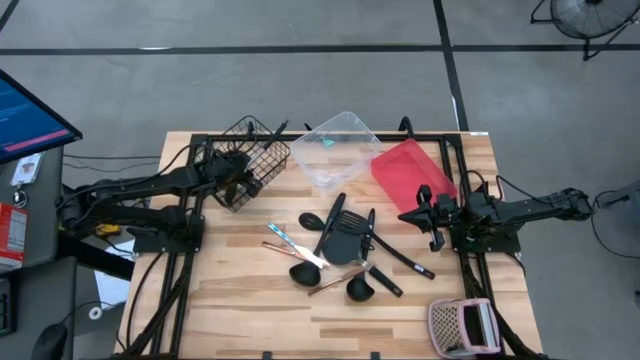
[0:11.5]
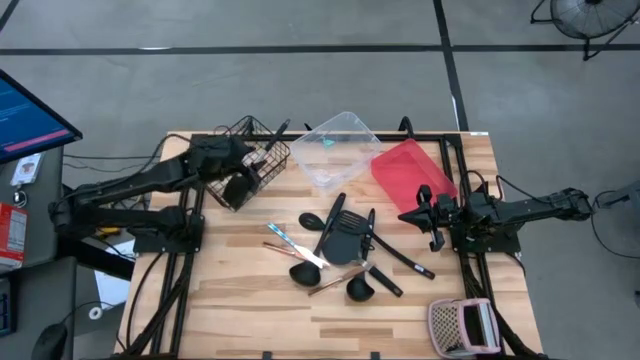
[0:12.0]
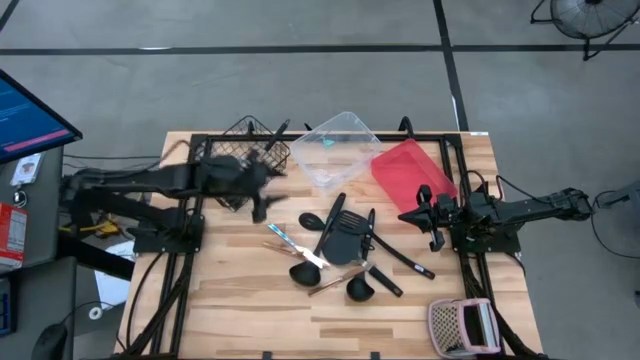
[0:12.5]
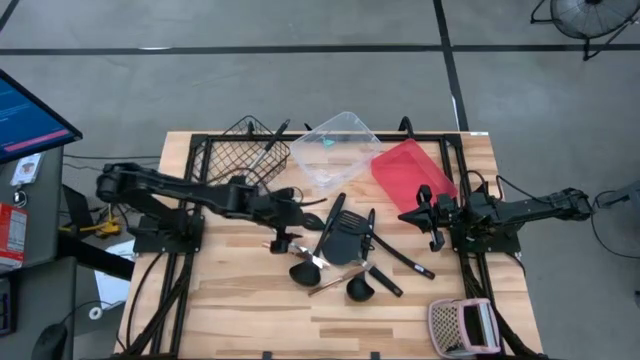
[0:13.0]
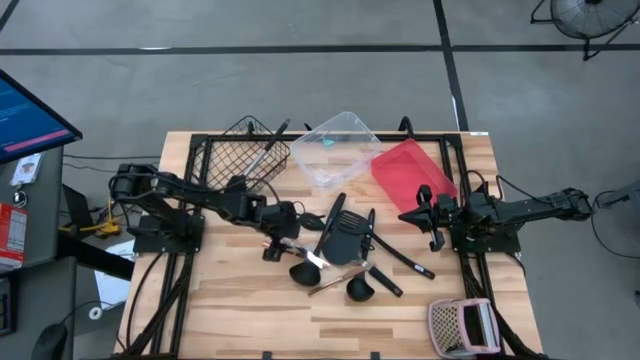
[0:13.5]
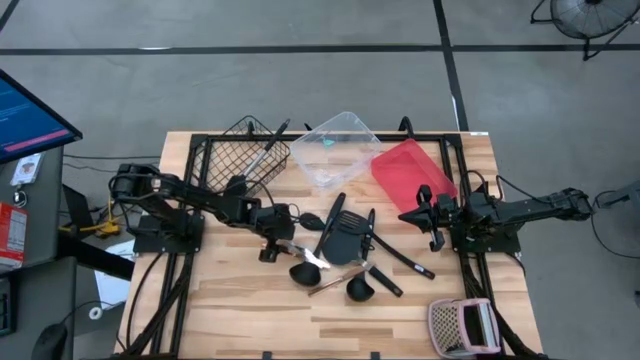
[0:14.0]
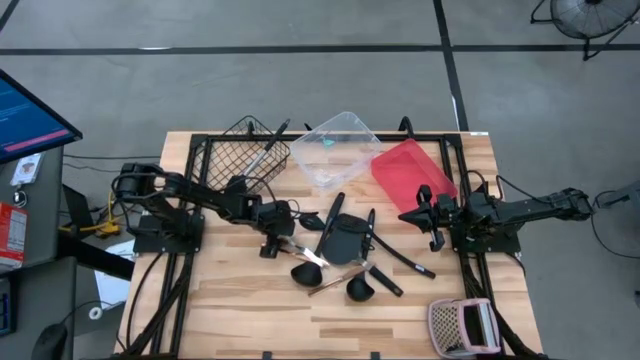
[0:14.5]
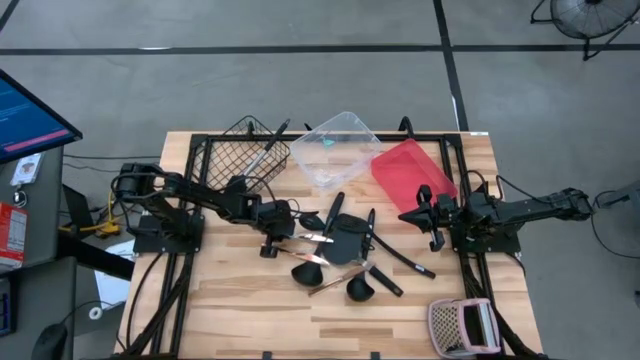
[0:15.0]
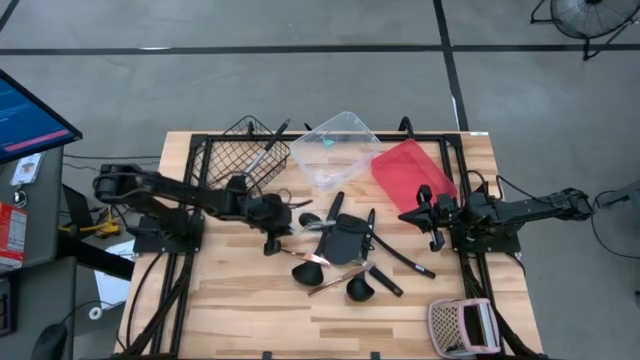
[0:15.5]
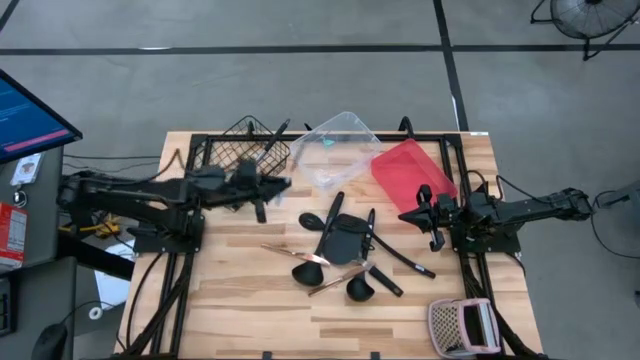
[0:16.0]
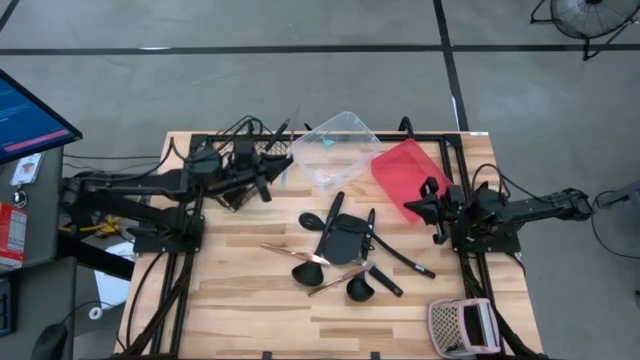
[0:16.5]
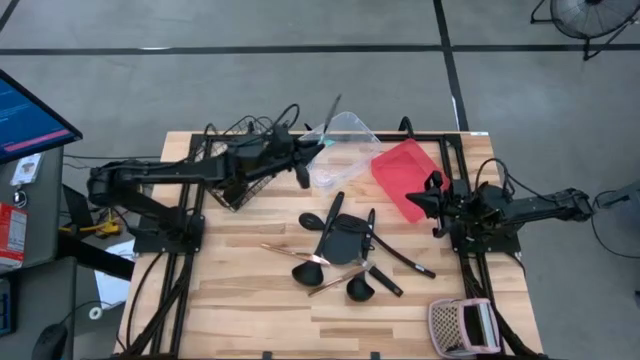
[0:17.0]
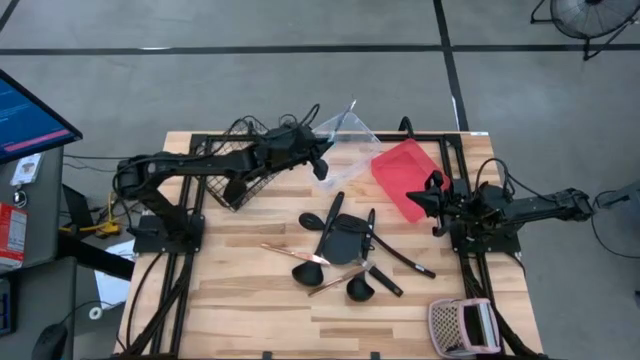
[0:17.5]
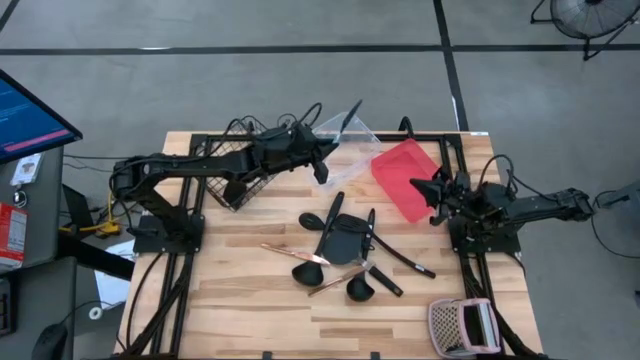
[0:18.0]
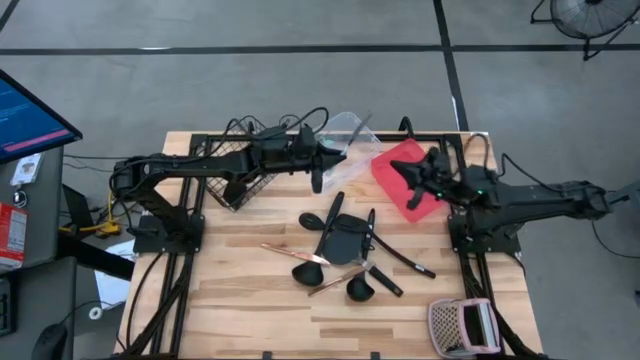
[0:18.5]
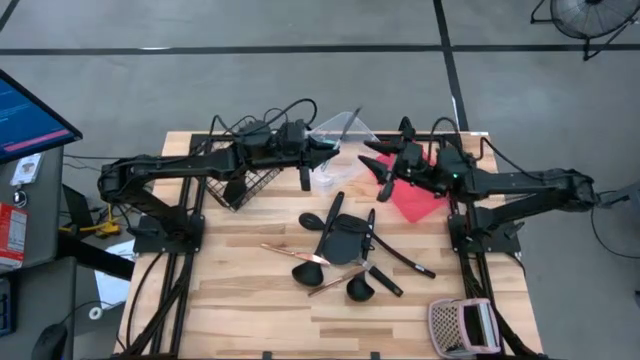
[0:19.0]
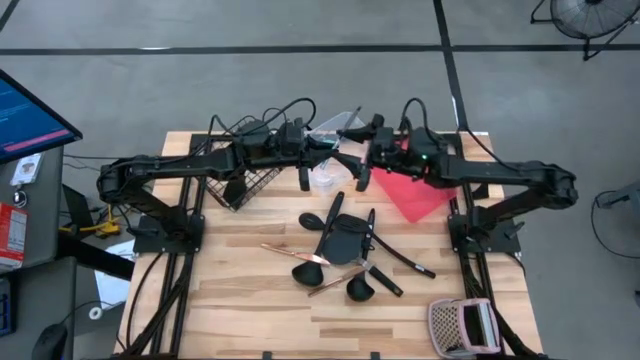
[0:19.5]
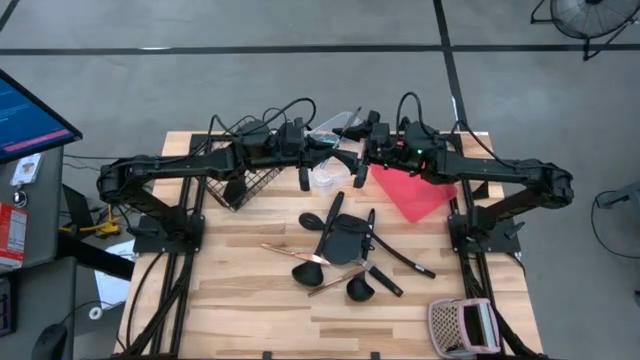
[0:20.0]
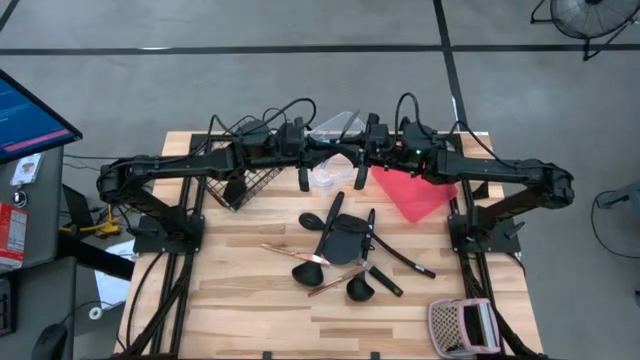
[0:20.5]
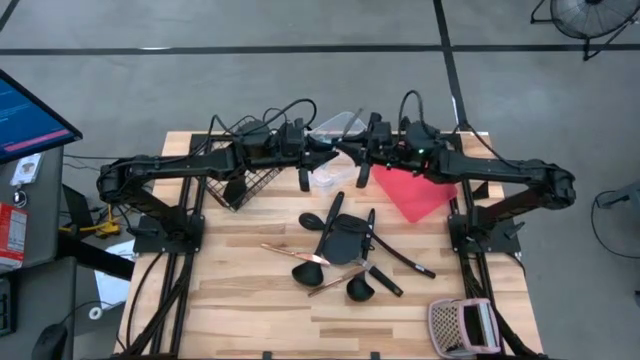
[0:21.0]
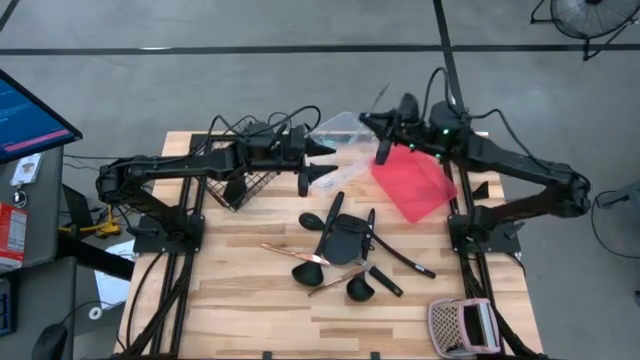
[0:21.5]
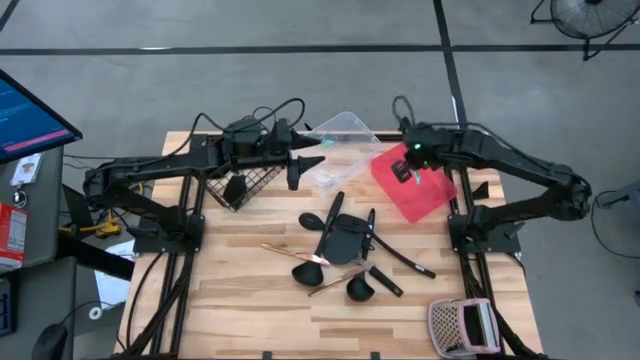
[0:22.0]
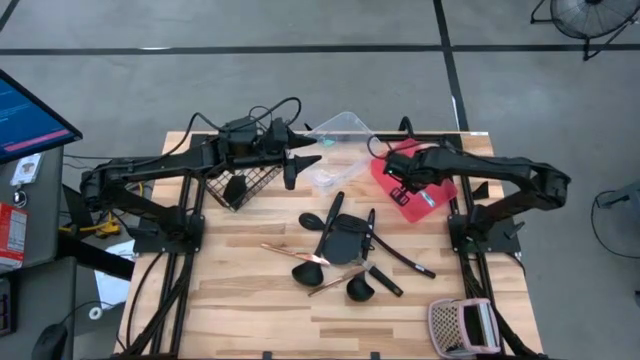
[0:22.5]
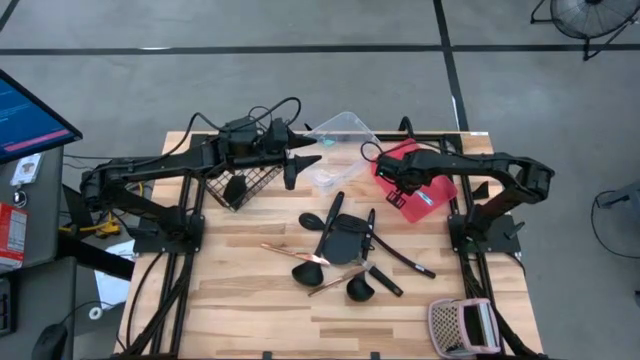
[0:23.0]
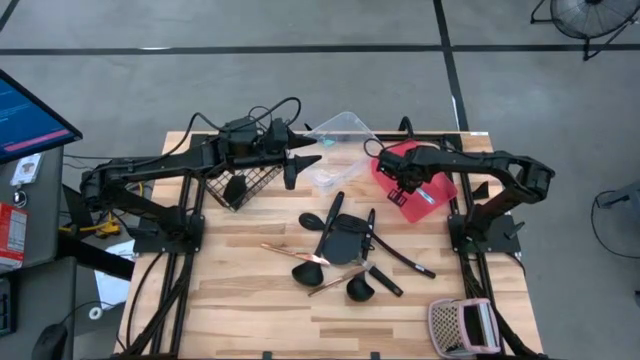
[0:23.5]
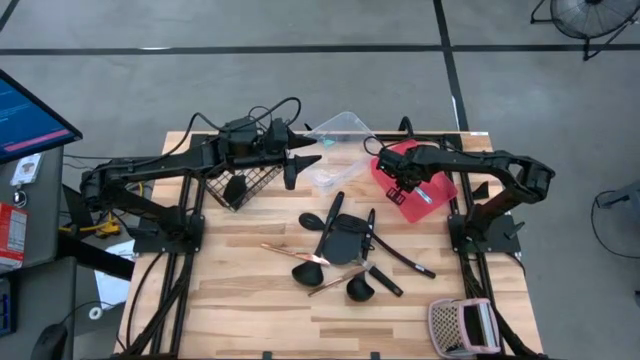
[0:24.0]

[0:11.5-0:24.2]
Task: Pick & Place Kitchen Items
Put the blue knife into the red bin

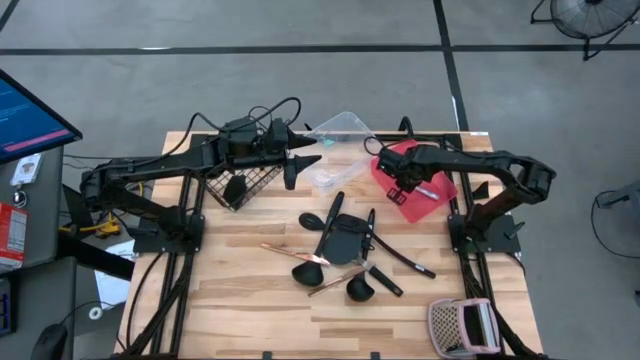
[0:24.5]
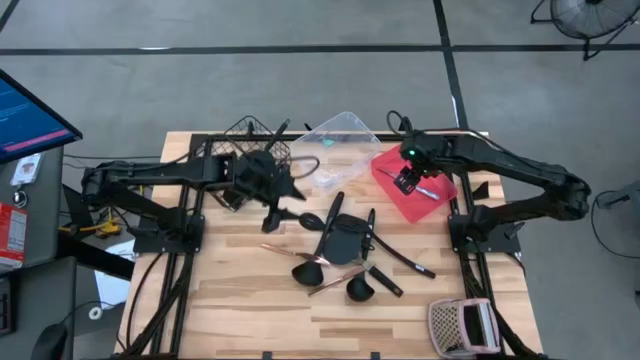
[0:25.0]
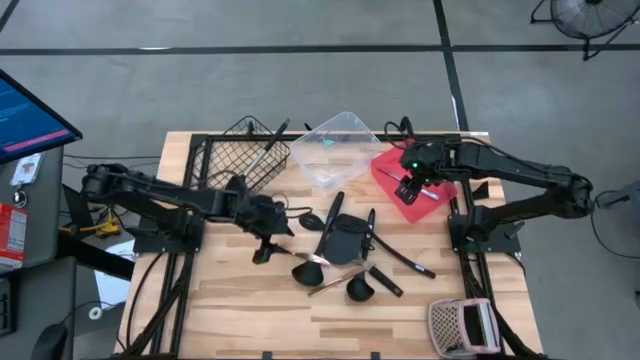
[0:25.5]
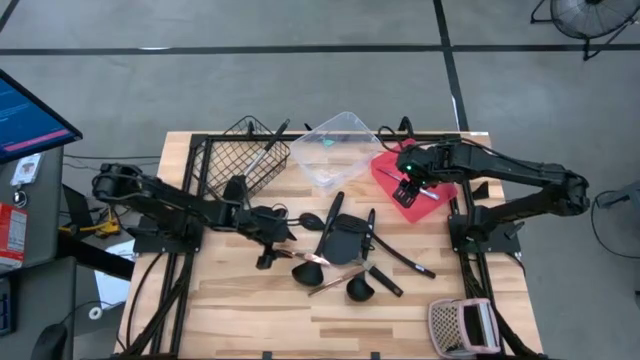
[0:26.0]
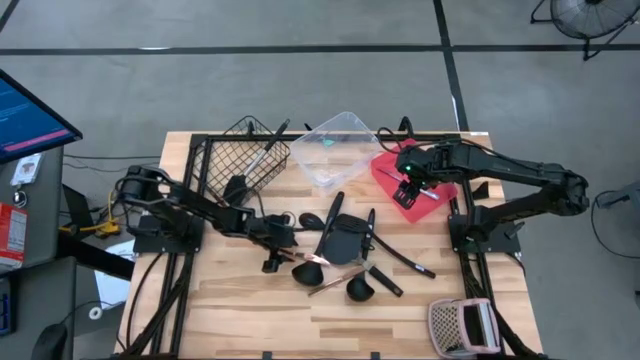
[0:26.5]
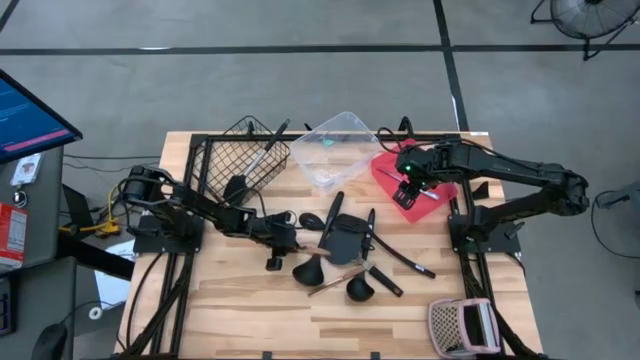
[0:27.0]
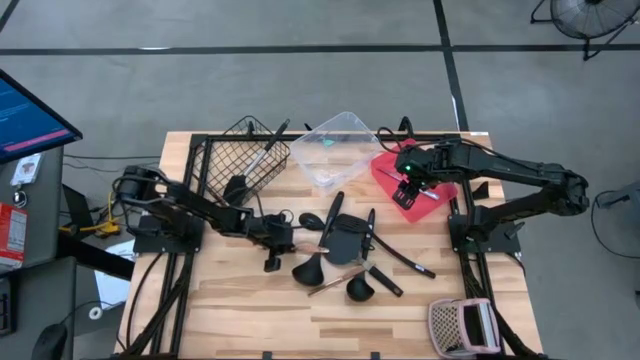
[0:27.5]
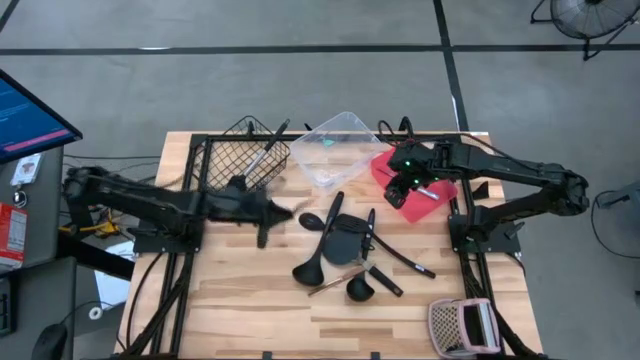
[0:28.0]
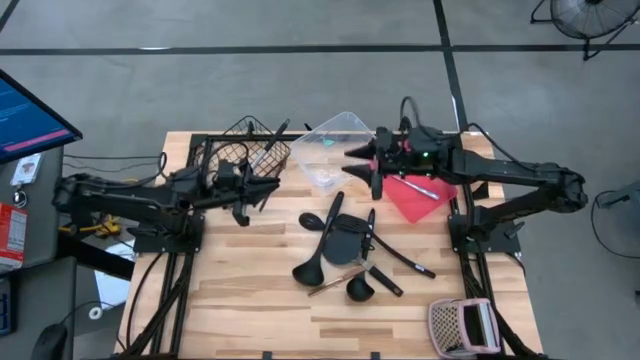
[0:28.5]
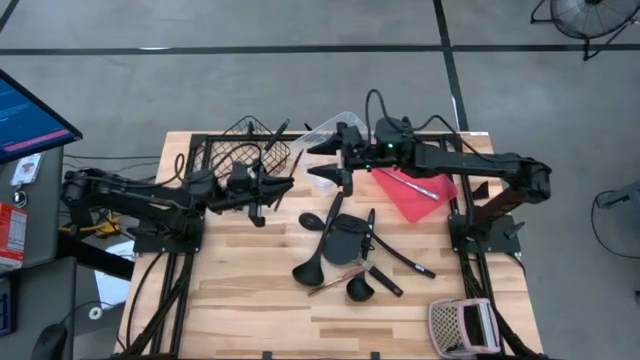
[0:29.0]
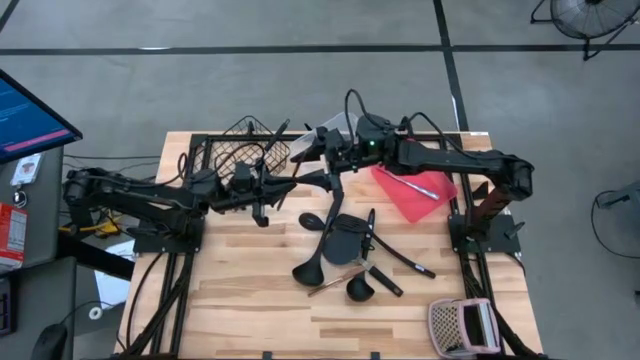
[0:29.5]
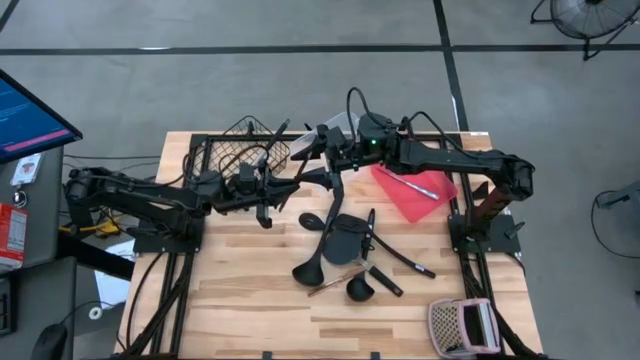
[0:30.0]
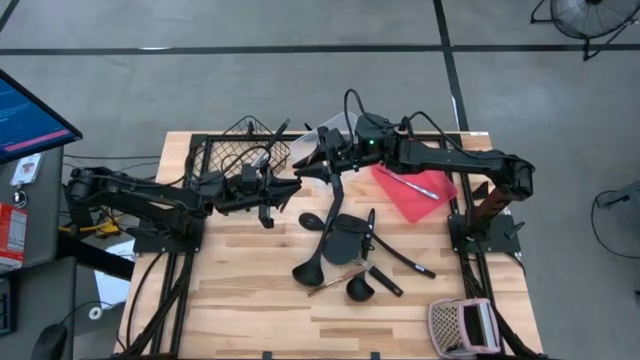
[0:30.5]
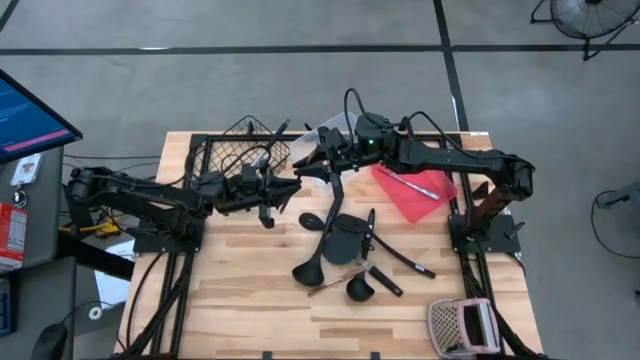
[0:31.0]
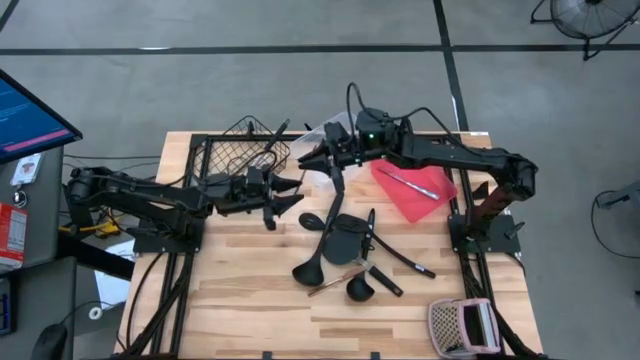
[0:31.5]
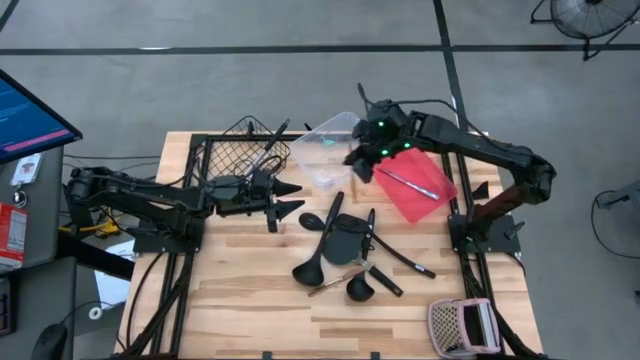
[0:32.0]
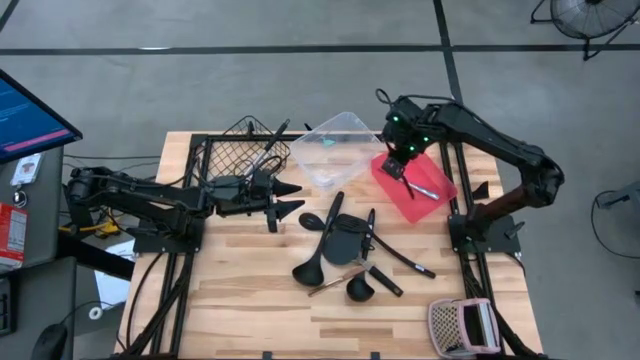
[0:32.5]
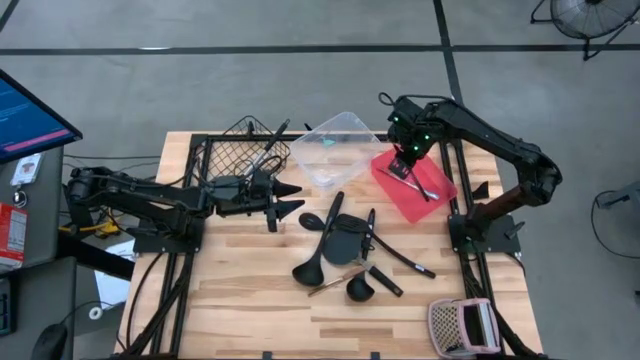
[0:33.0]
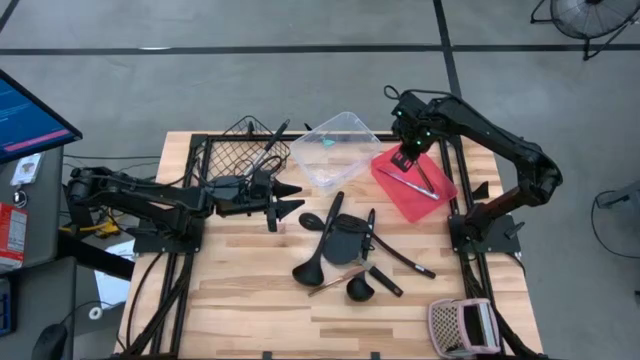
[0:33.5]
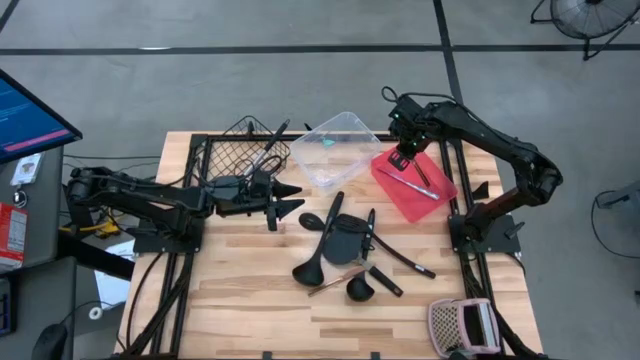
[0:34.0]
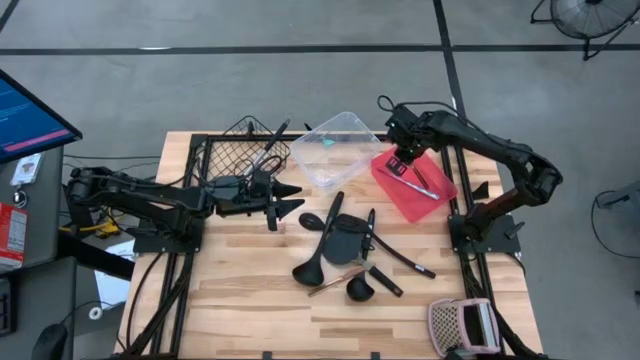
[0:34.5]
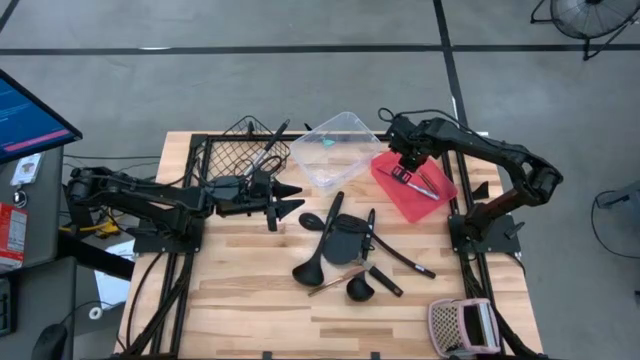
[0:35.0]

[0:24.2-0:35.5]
Put the left gold knife into the red bin
